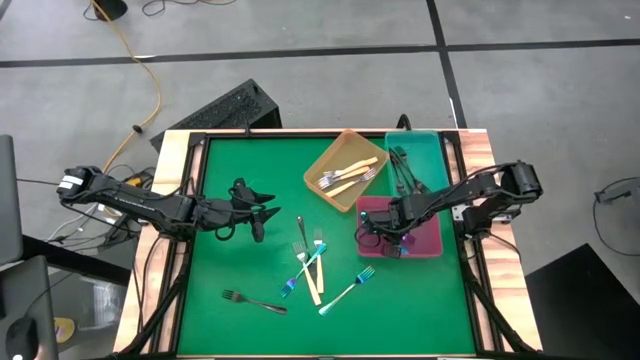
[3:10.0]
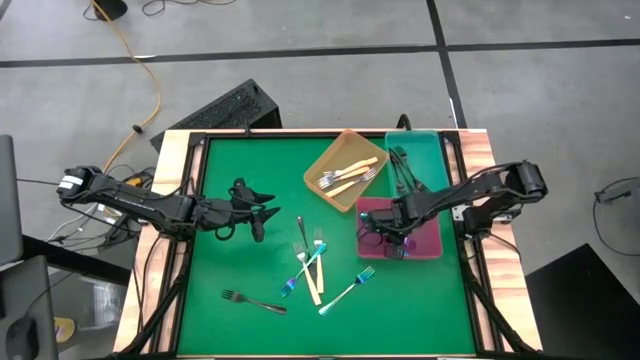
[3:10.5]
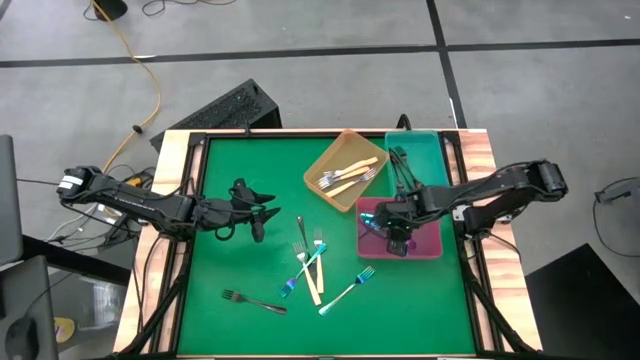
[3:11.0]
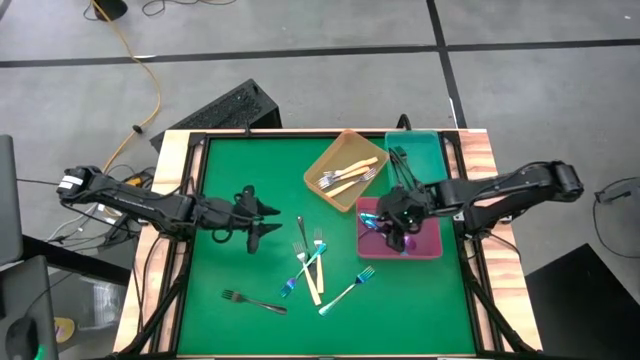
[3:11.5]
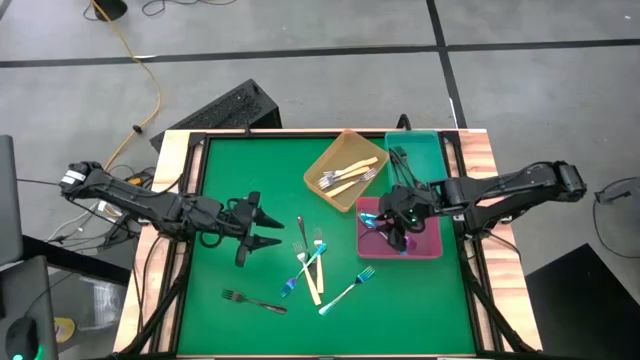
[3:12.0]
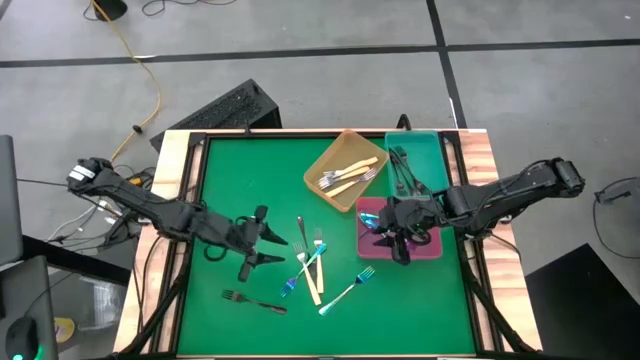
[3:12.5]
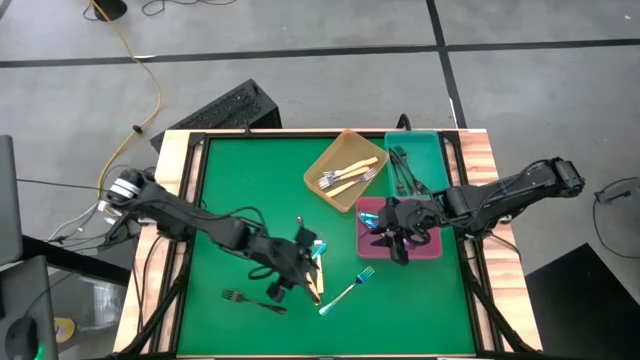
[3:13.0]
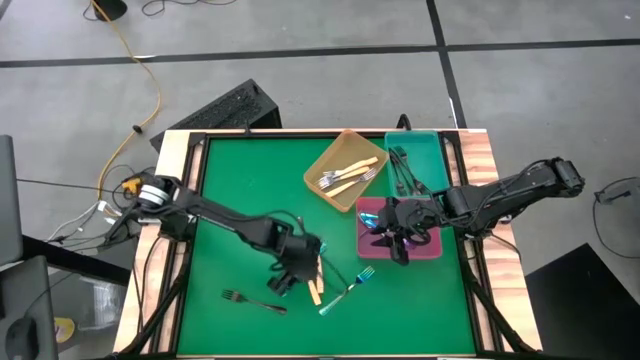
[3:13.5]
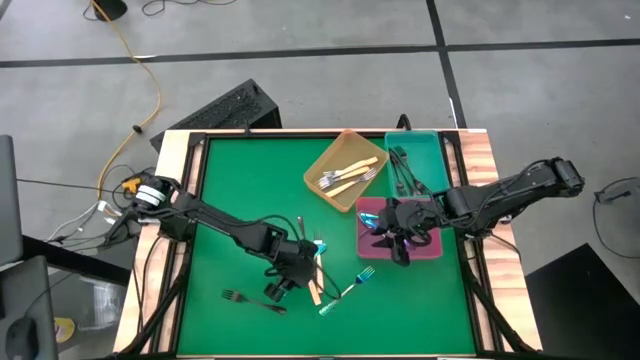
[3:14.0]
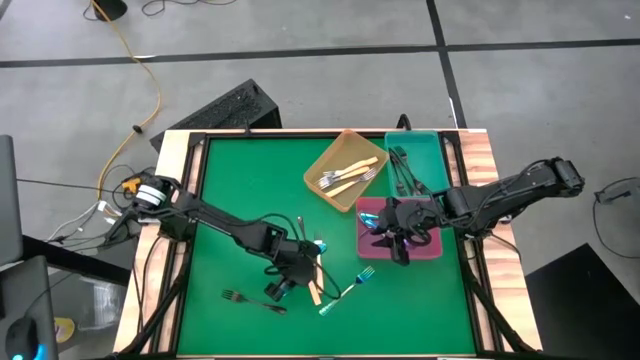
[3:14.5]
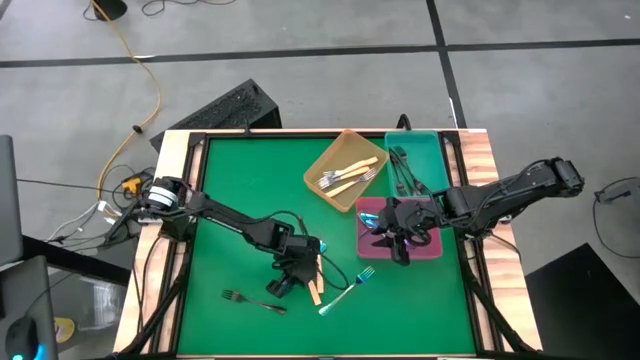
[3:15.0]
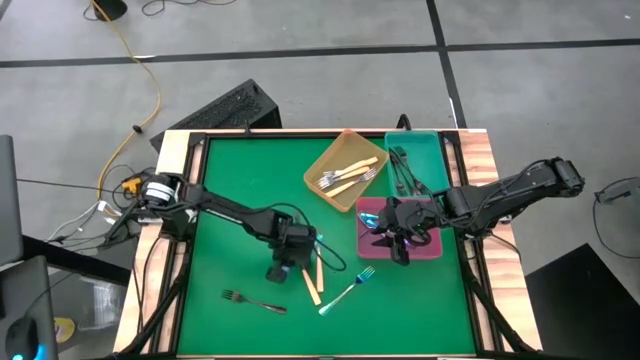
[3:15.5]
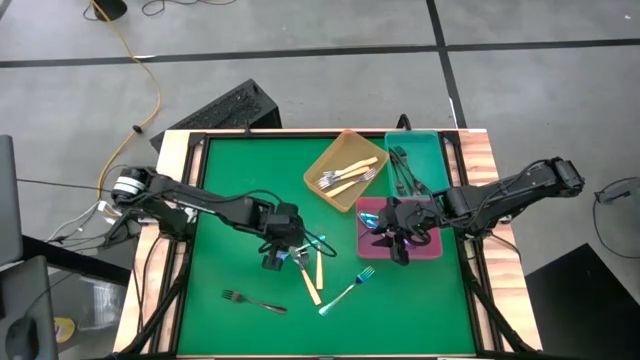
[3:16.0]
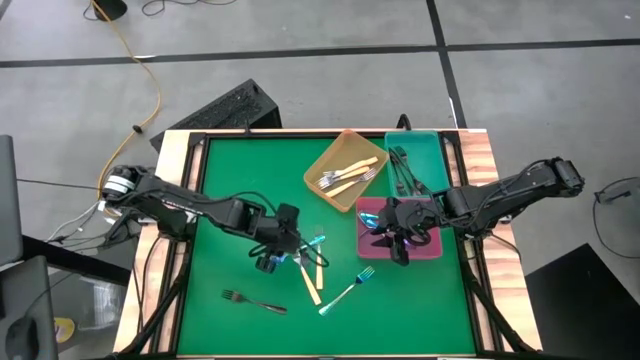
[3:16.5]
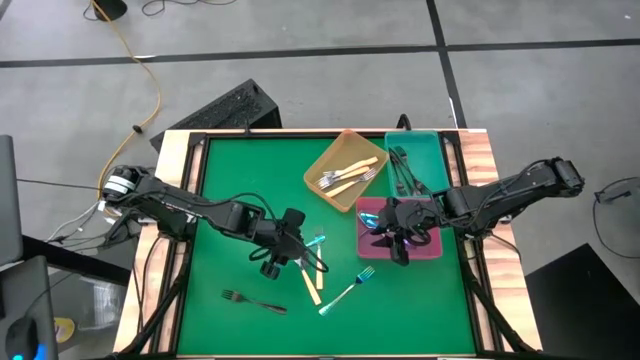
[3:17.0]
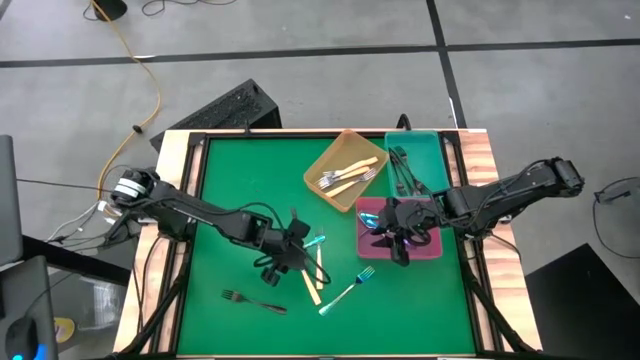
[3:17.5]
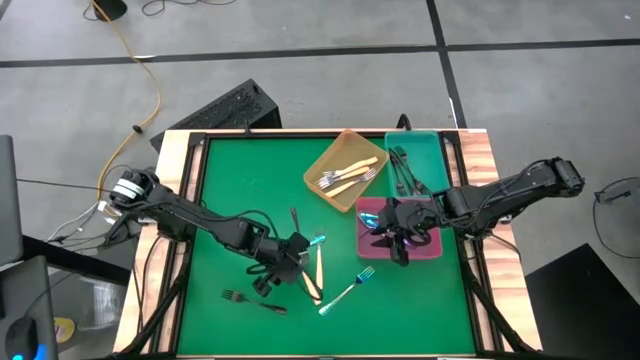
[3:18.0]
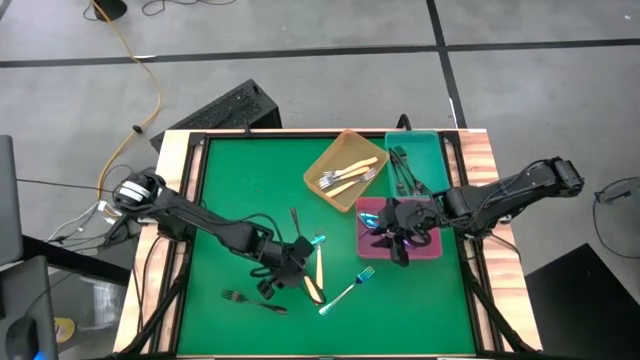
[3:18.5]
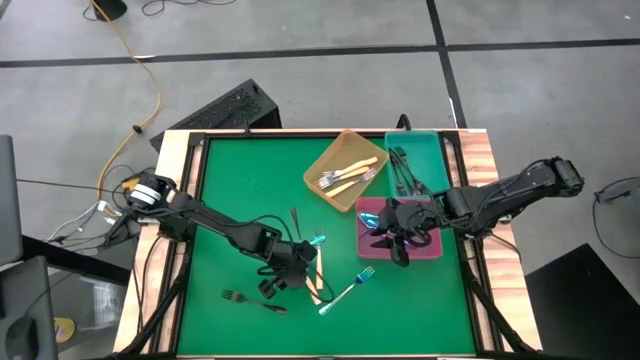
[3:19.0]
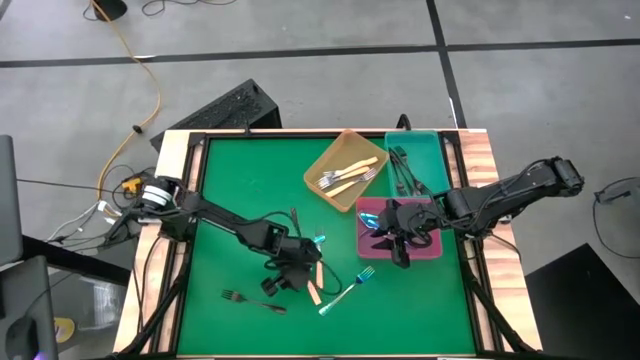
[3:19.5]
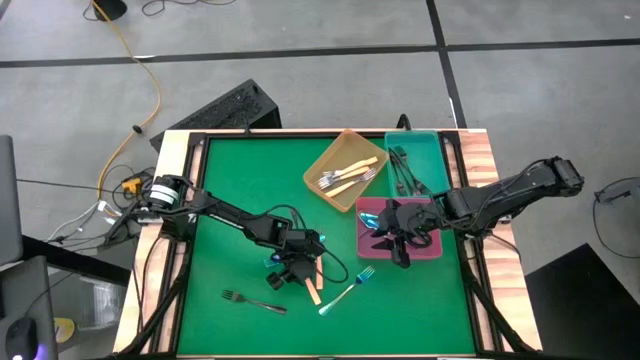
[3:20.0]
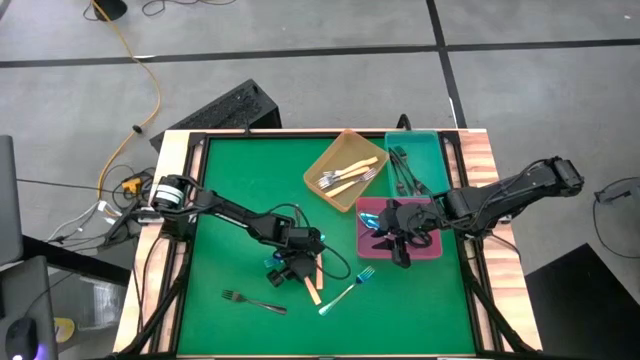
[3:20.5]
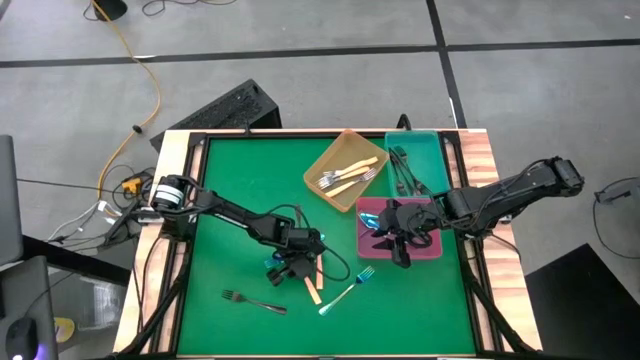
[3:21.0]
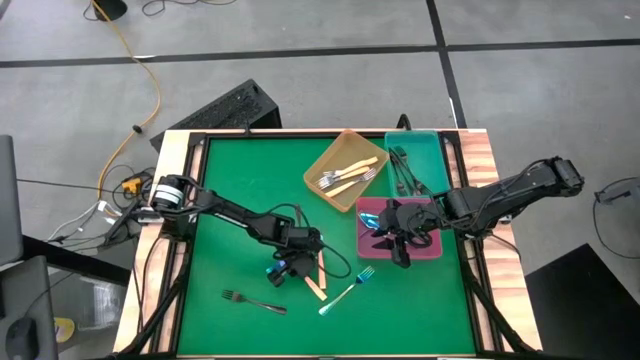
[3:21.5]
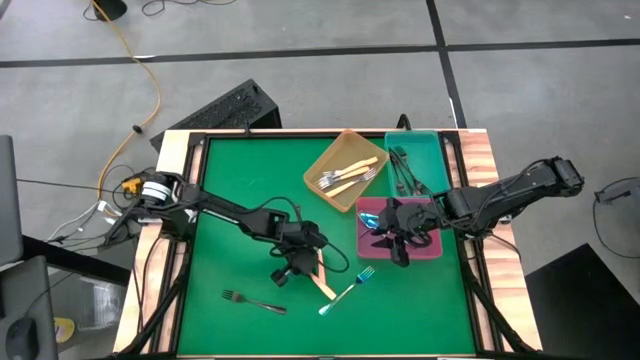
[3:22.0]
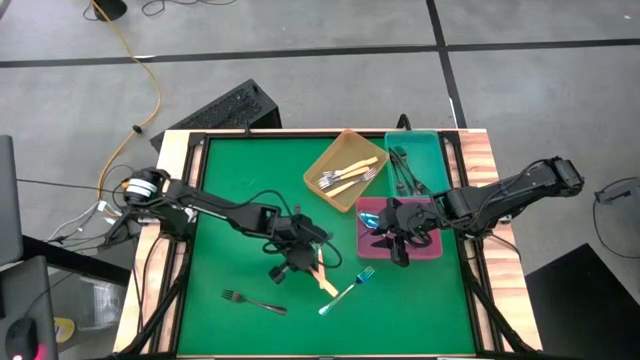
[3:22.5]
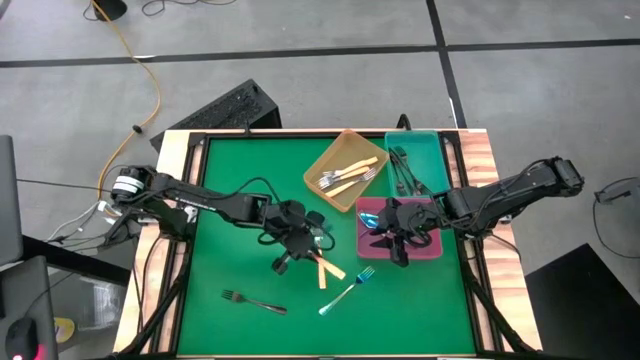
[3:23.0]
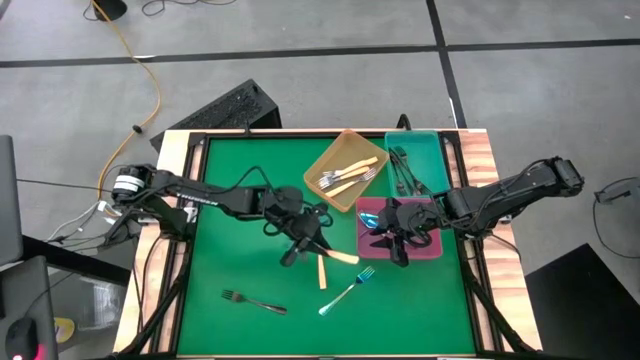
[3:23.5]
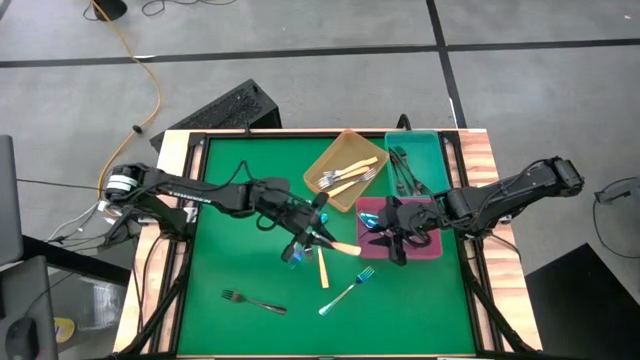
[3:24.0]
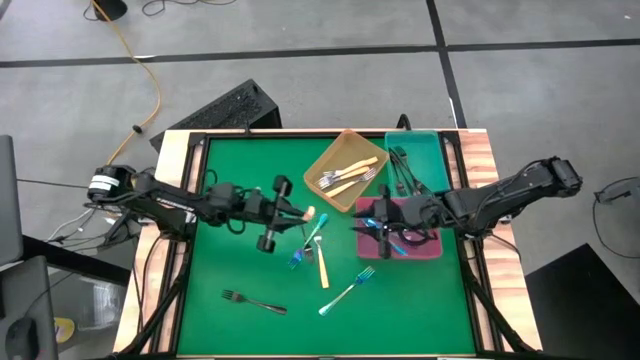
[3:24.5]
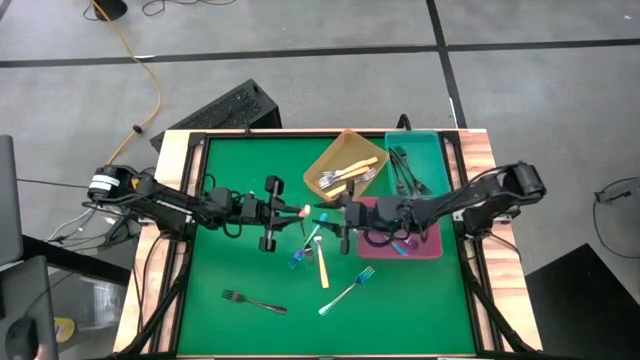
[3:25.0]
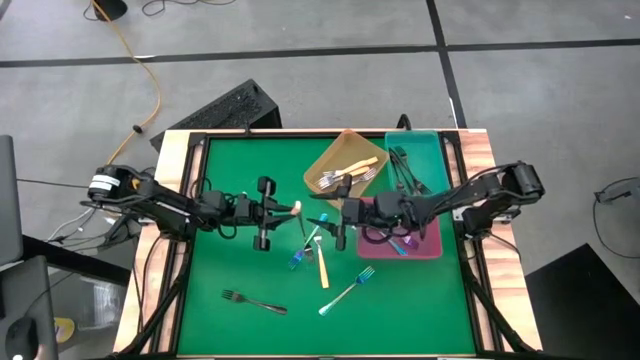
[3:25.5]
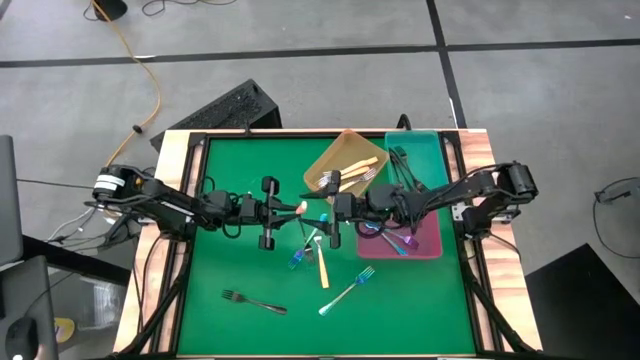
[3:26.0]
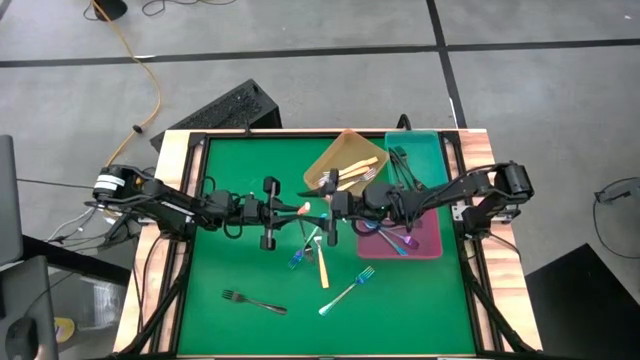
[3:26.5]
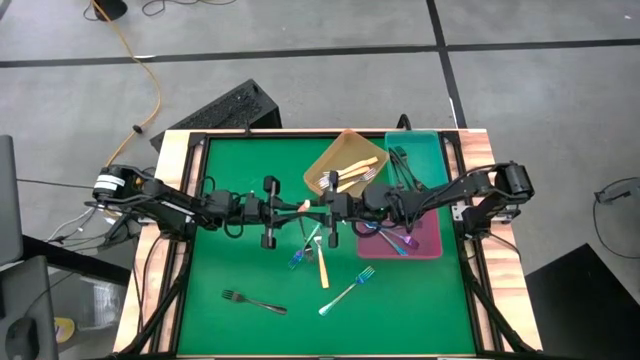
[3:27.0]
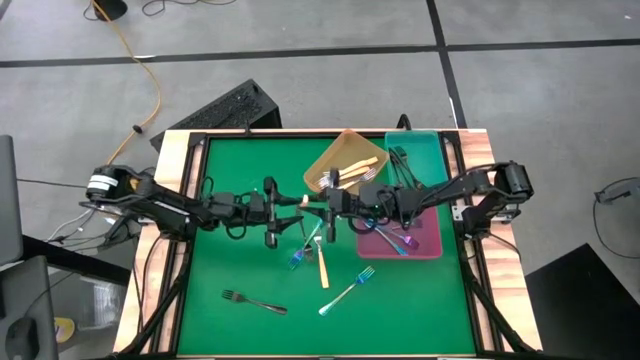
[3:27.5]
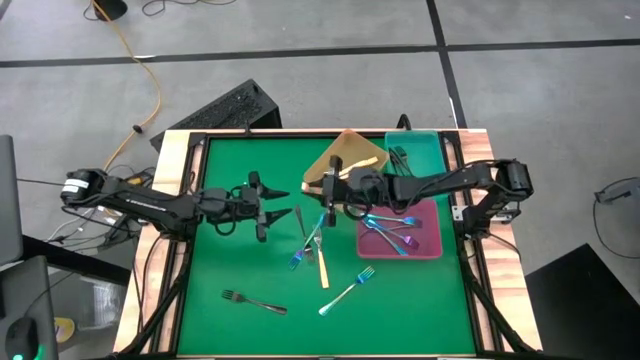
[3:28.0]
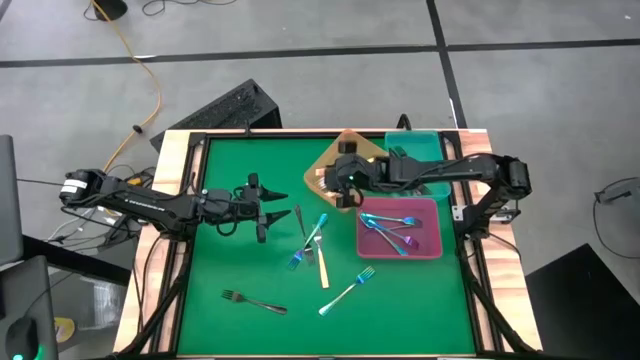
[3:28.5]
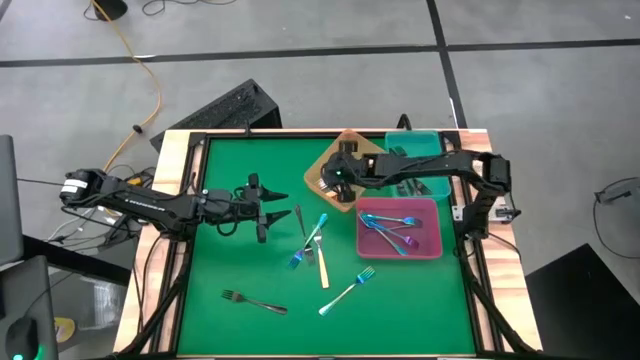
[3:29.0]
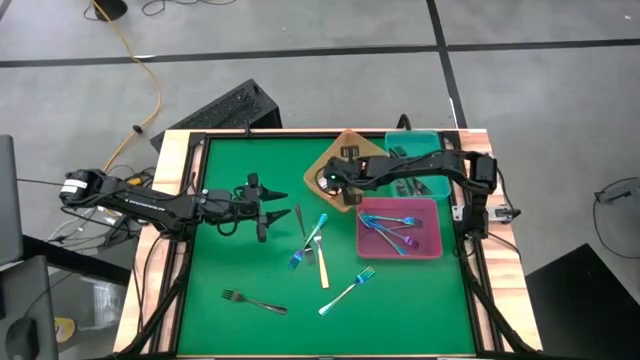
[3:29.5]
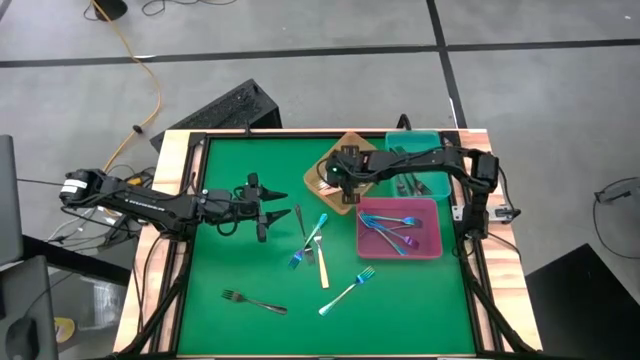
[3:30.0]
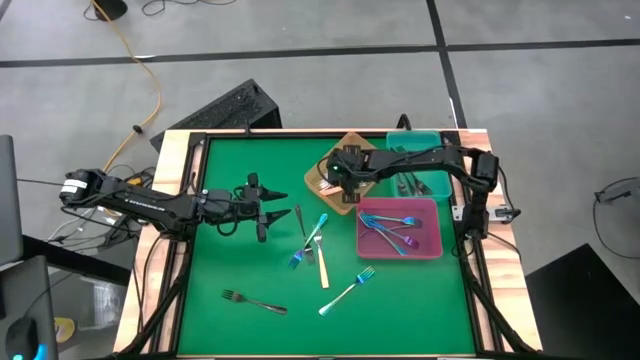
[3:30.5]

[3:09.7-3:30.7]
Task: Sort silverware by color (type)
Put the orange fork into the orange bin

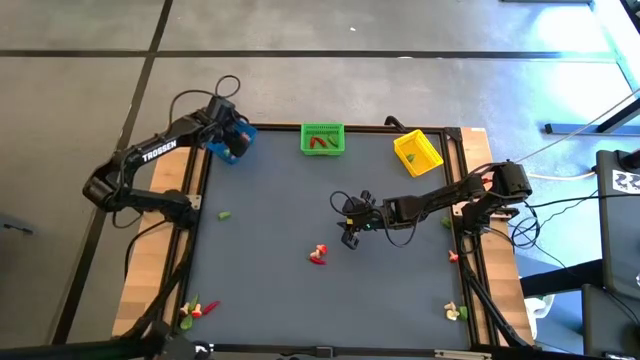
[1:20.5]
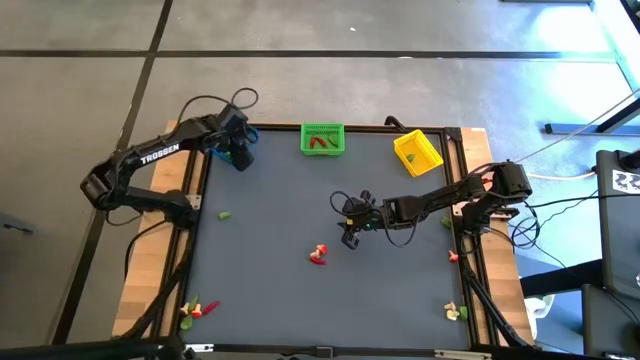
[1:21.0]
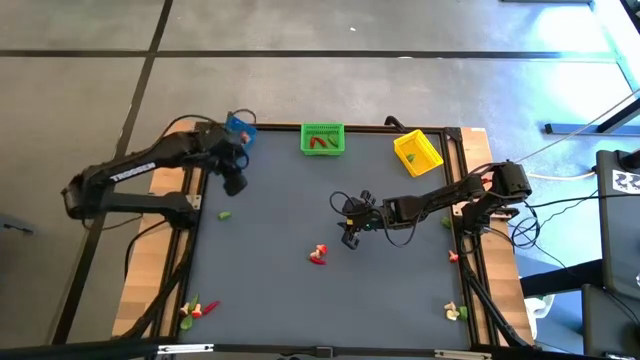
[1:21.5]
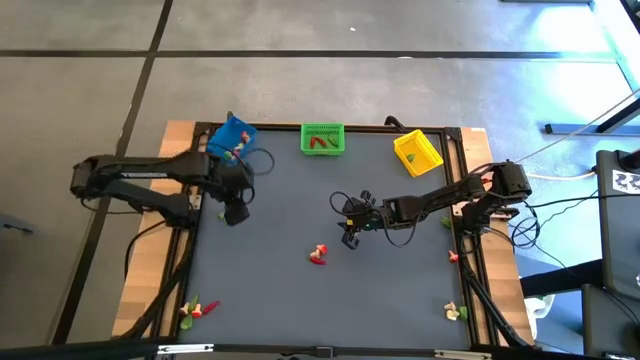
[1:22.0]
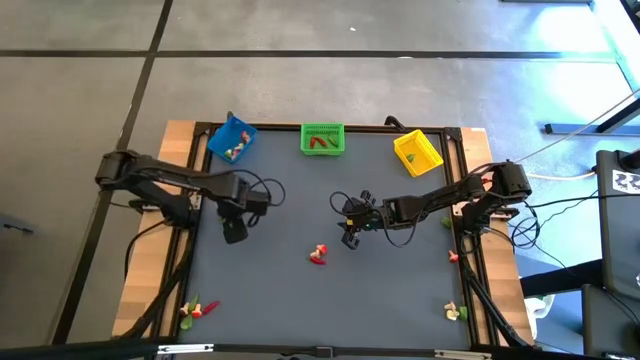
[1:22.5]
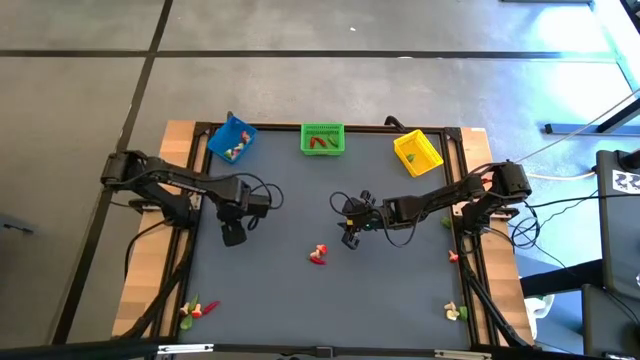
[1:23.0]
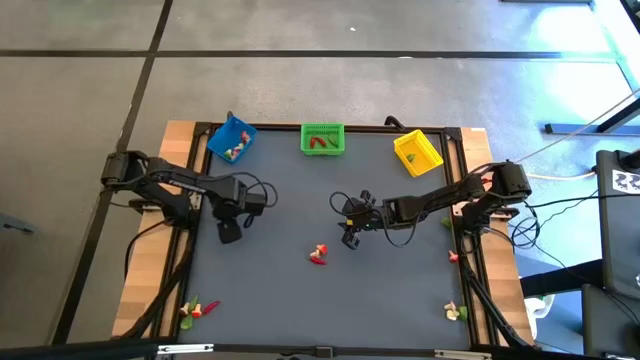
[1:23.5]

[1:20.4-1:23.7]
Task: Sort produce into baskets
Put the green chili pepper into the yellow bin
